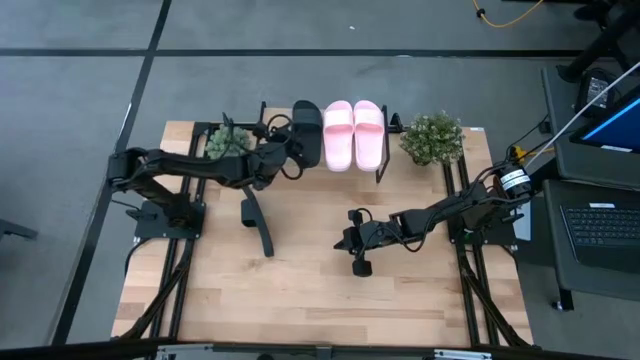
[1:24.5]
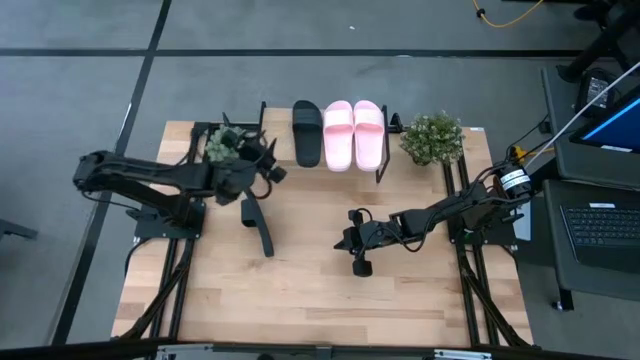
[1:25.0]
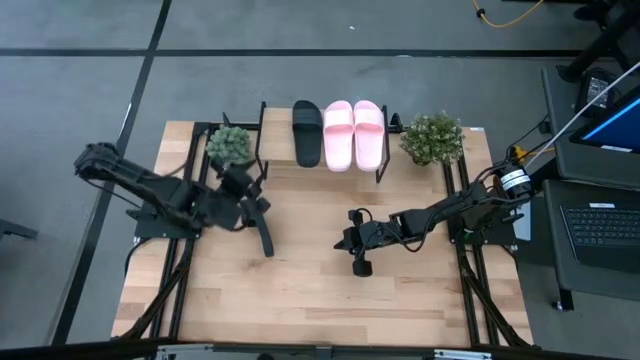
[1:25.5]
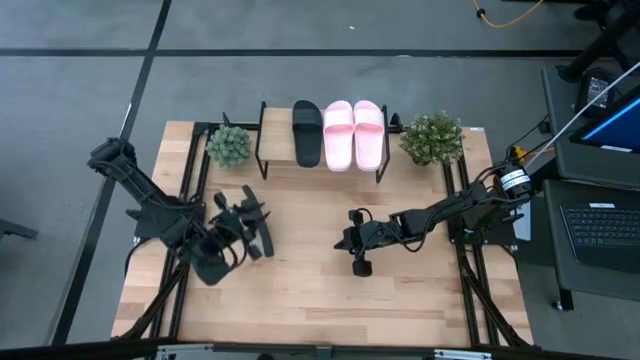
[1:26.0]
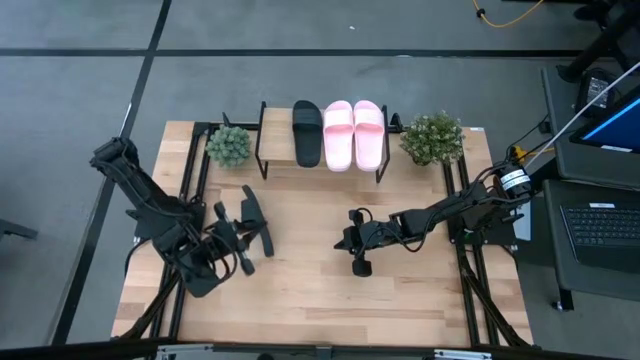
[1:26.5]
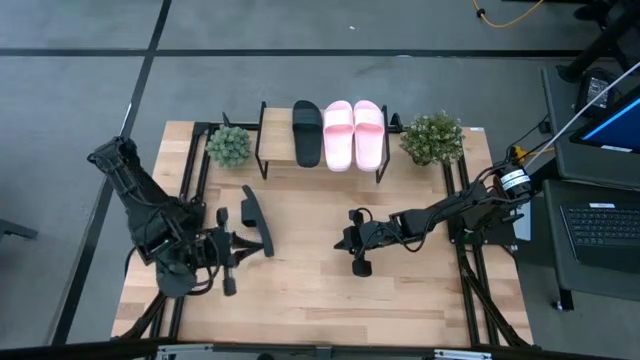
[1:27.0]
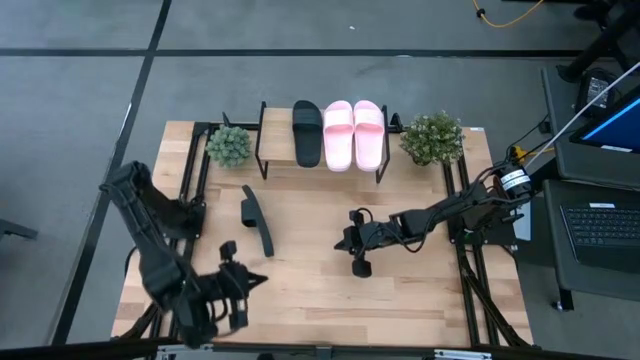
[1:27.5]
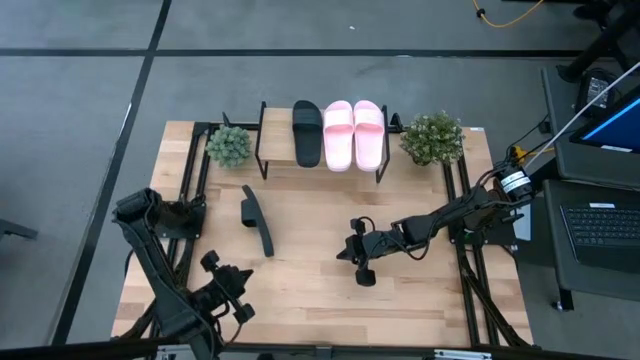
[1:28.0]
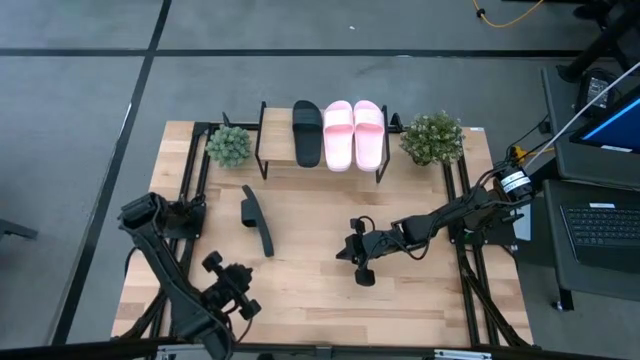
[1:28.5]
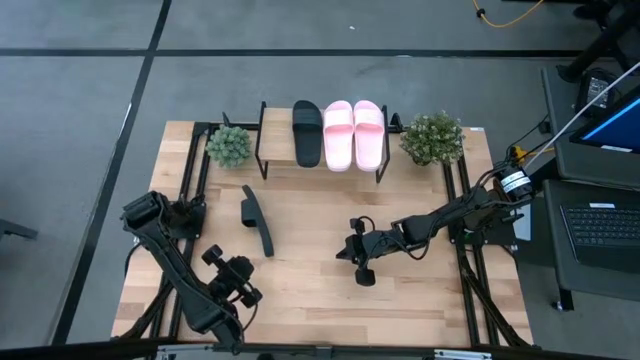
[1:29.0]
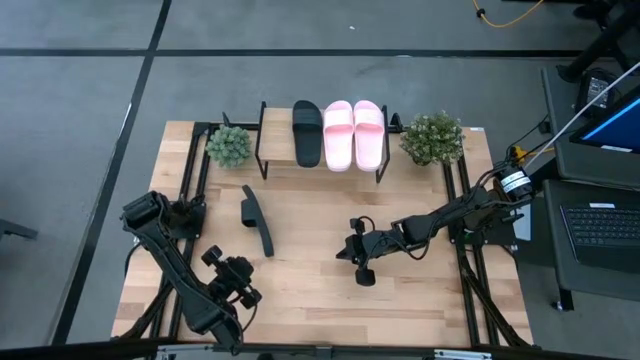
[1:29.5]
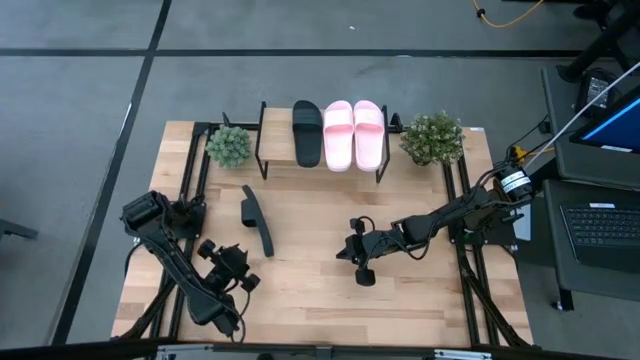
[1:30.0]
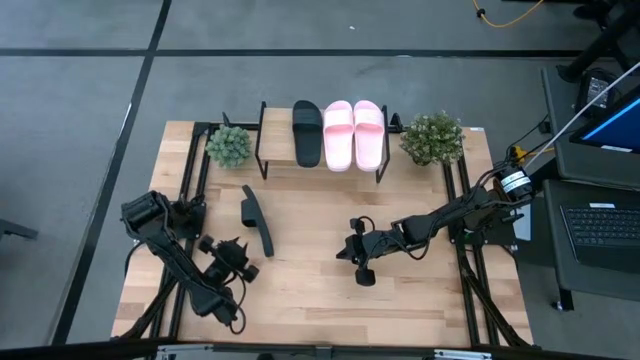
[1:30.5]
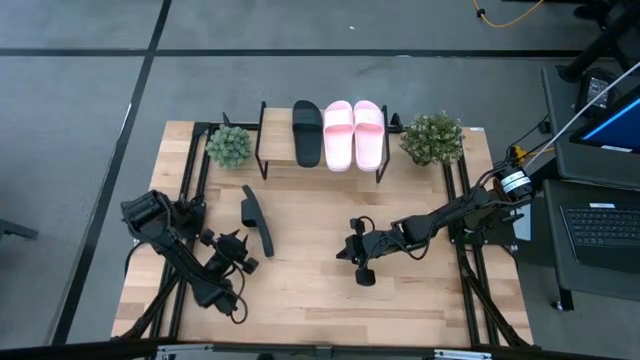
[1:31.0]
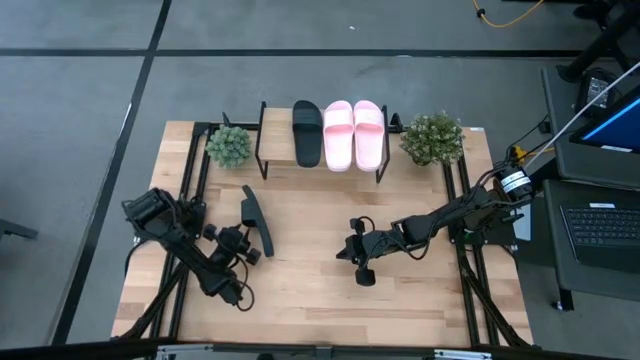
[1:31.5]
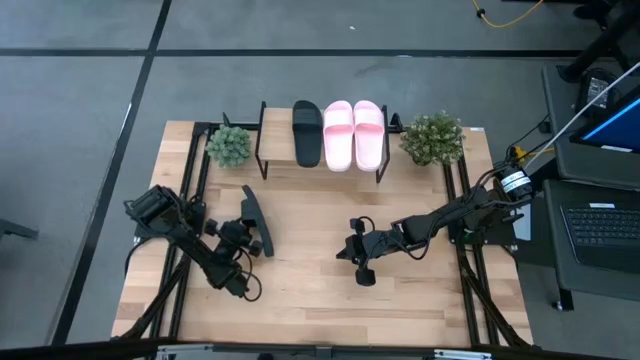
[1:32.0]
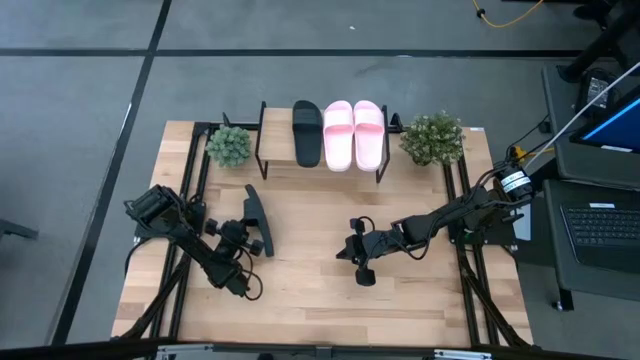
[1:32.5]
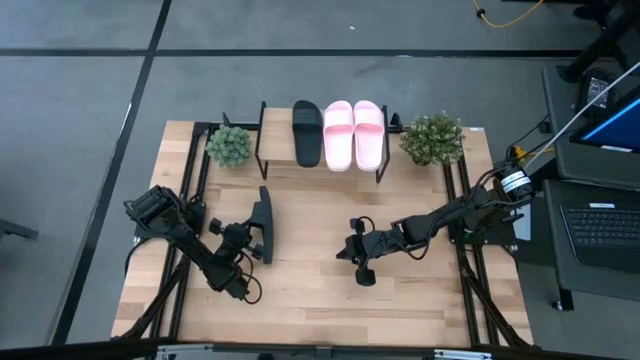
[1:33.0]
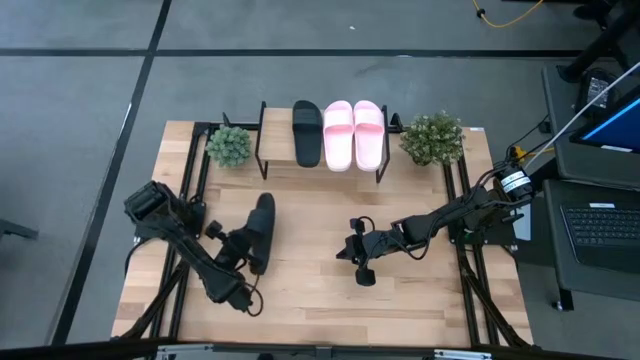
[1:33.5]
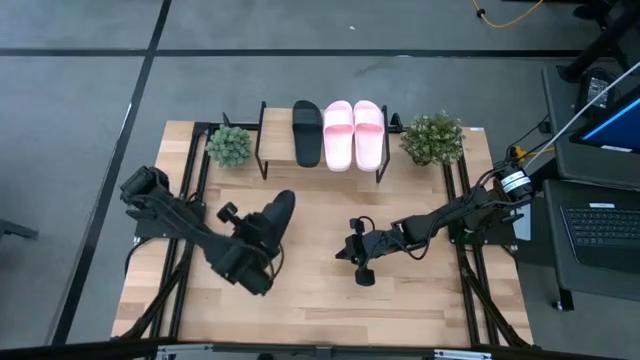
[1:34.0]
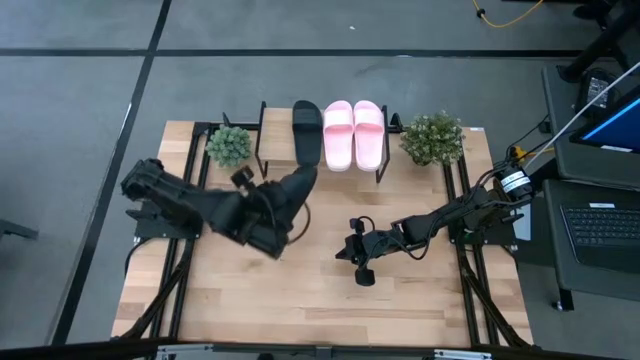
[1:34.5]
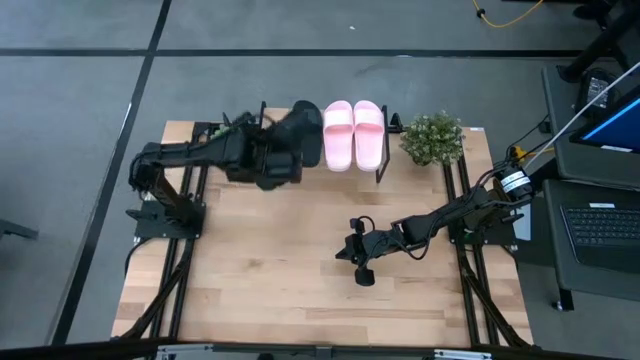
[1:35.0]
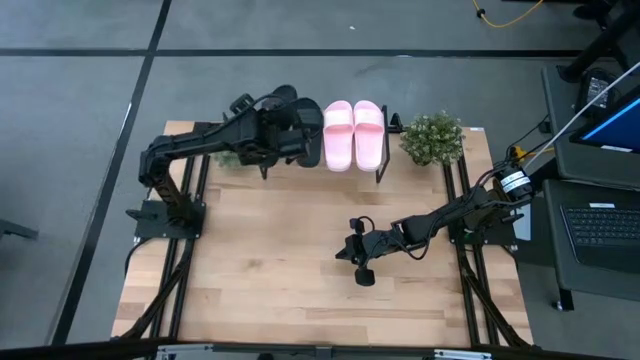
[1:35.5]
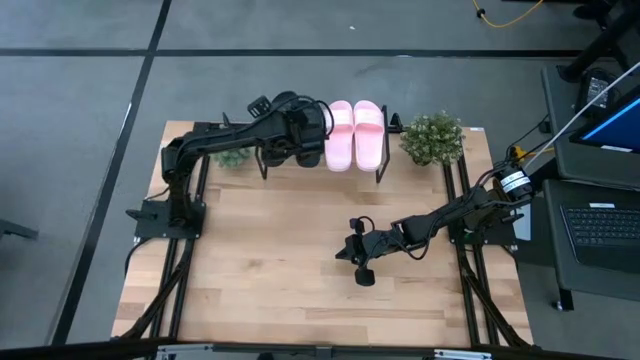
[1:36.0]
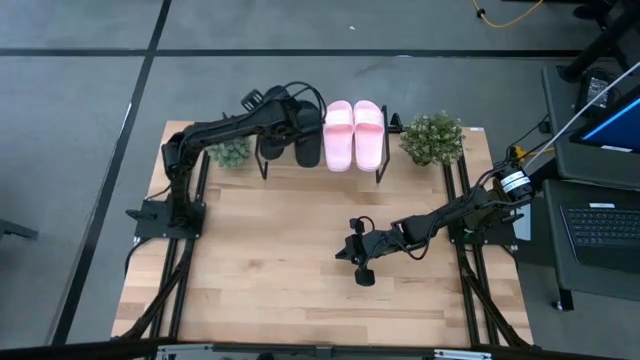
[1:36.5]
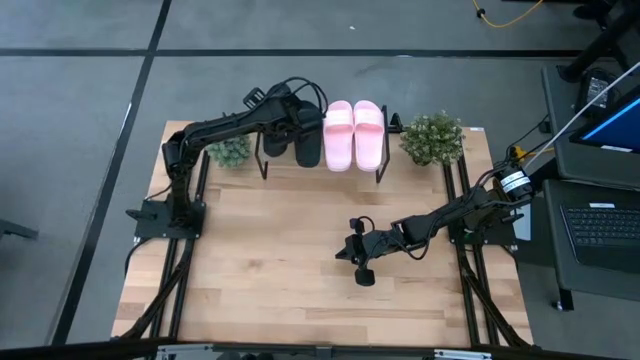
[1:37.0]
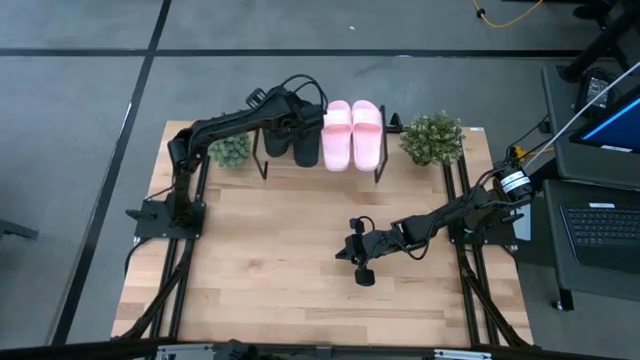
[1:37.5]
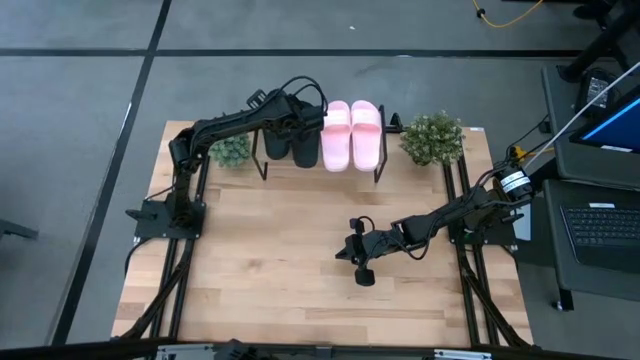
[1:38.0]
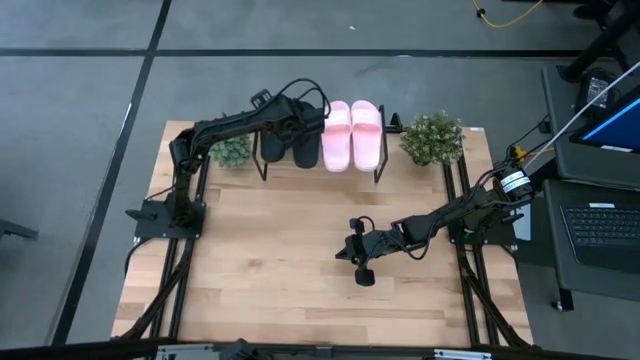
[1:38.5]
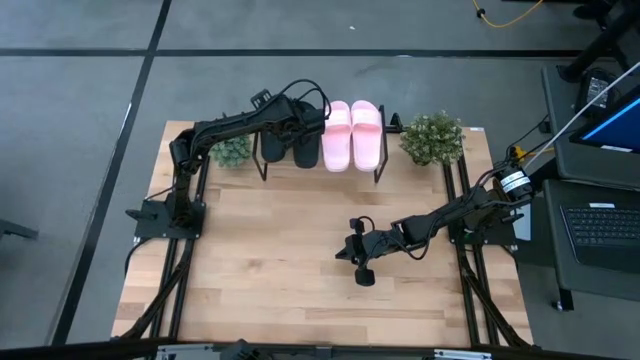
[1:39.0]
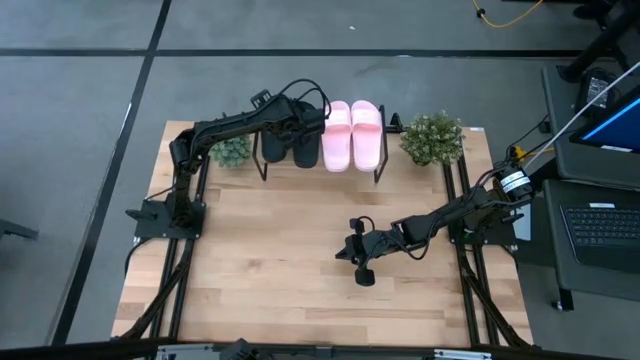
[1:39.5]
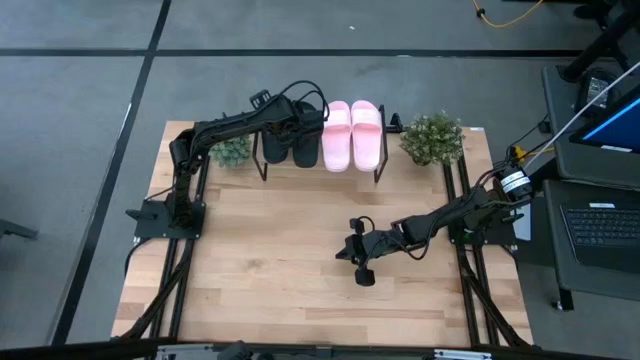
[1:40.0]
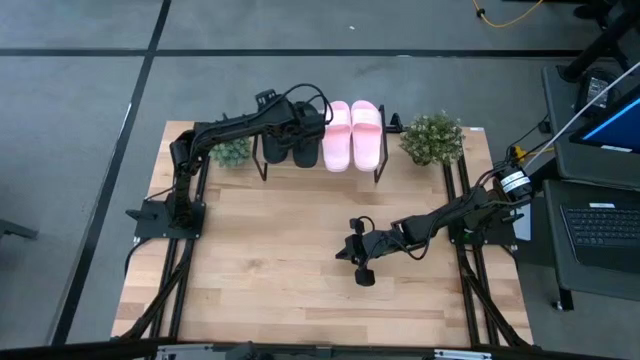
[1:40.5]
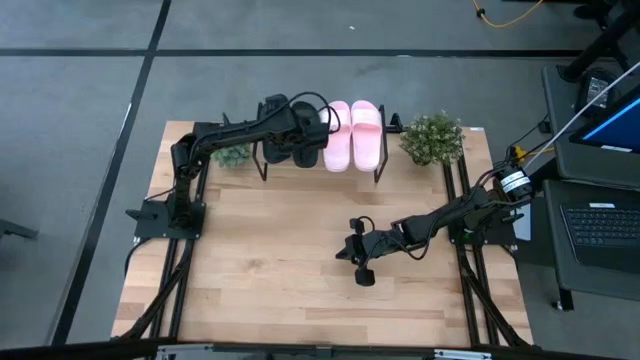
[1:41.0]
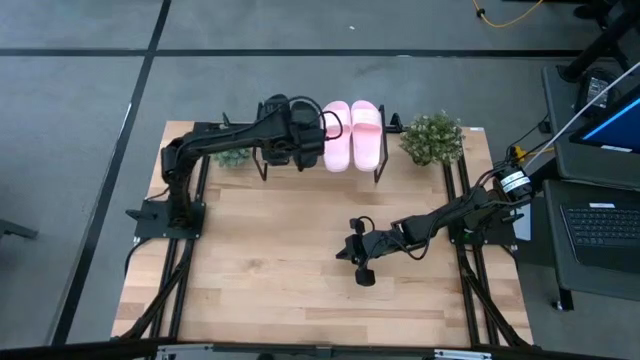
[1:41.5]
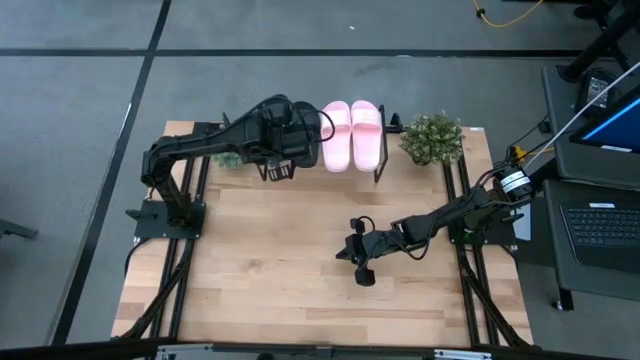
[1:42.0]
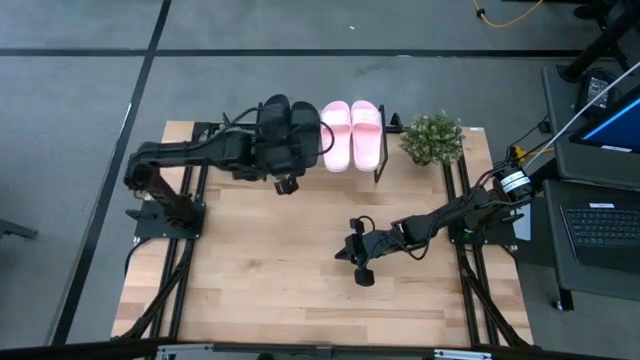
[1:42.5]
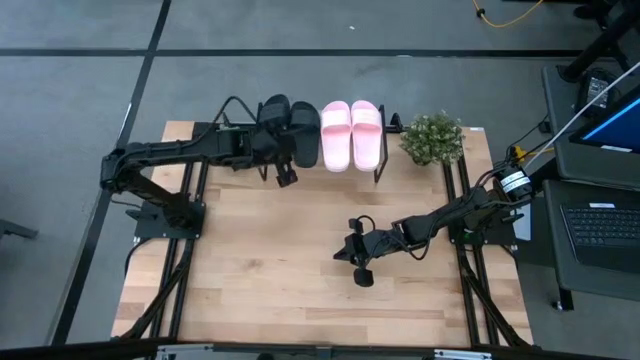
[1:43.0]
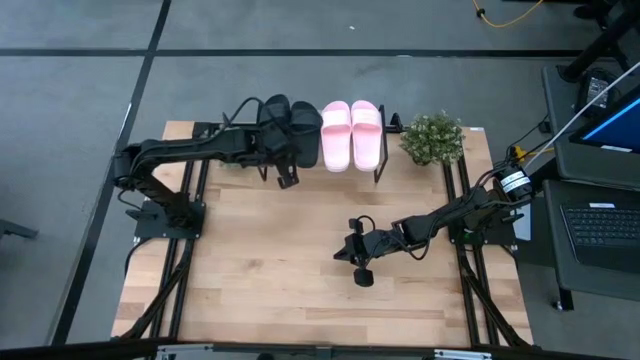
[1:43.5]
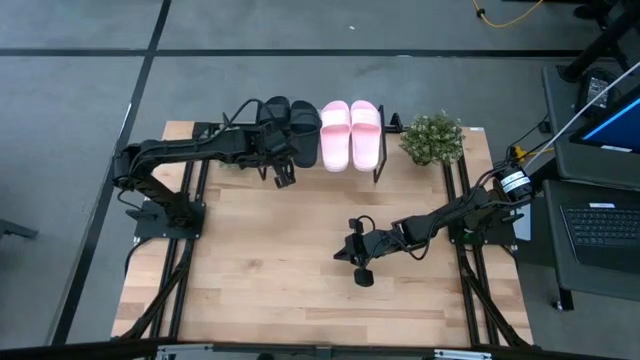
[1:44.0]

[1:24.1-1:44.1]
Task: Pick and place slides into the shelf
Put the black slipper on the shelf

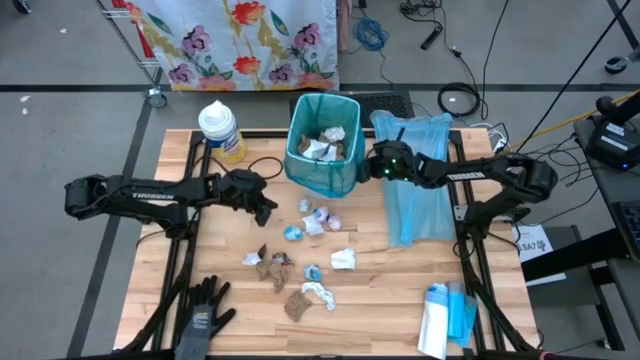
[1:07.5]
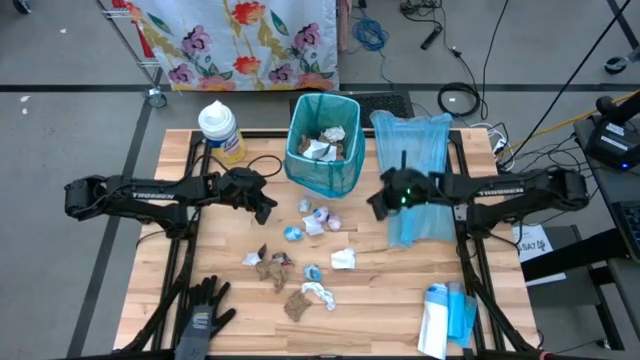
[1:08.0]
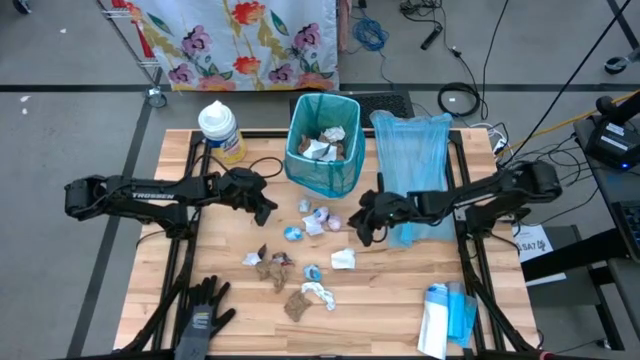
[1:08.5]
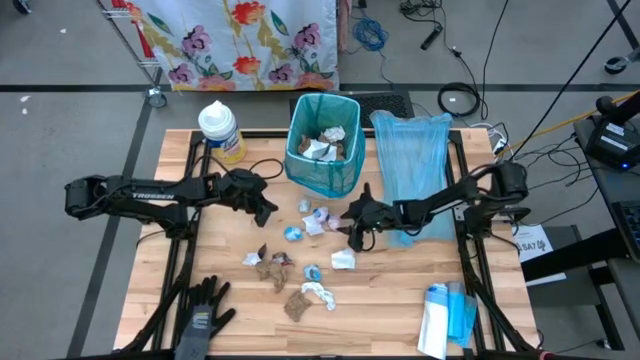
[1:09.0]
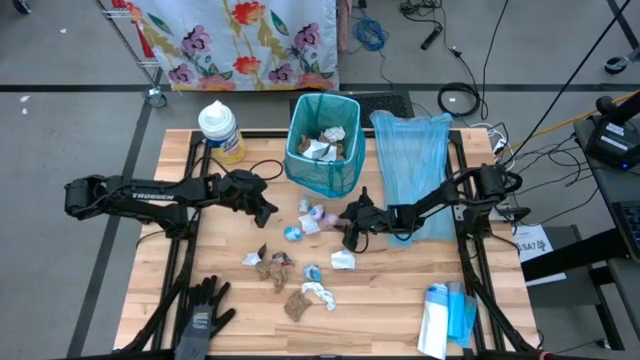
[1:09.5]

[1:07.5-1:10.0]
Task: place trash/remove bag and relplace
Put the right pink plastic into the trash bin
